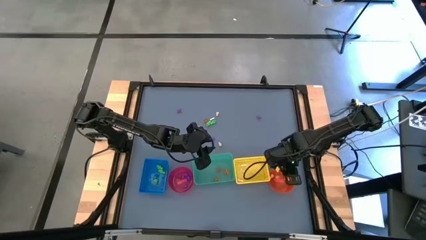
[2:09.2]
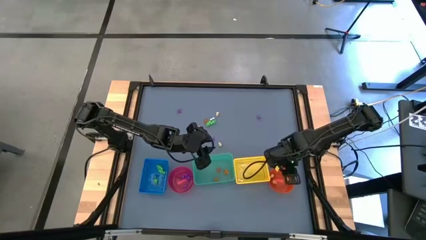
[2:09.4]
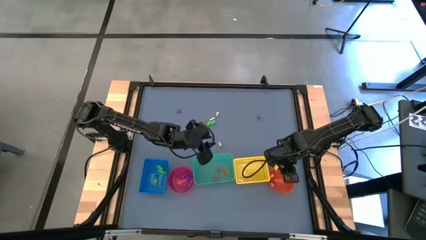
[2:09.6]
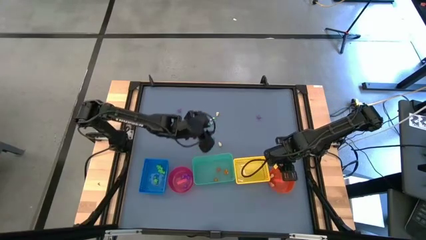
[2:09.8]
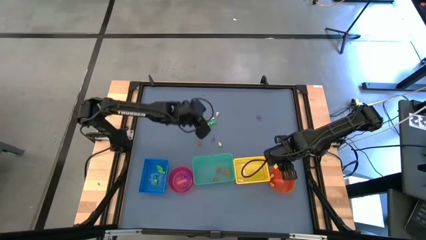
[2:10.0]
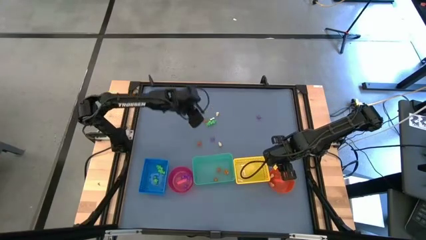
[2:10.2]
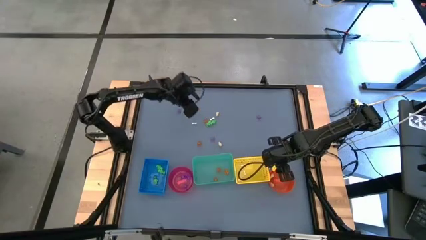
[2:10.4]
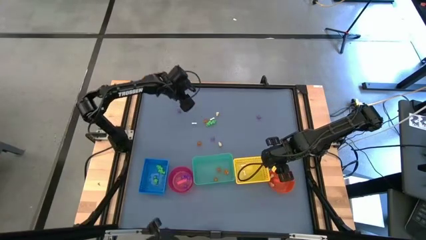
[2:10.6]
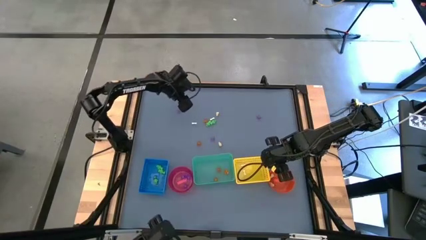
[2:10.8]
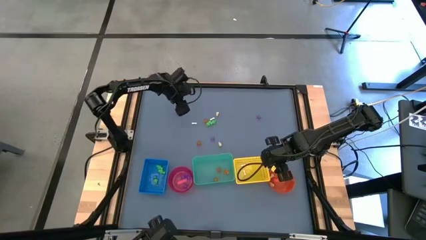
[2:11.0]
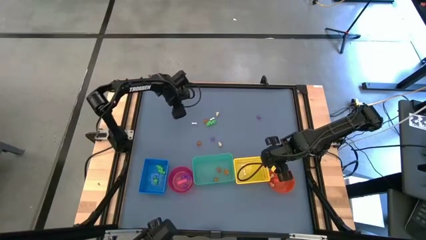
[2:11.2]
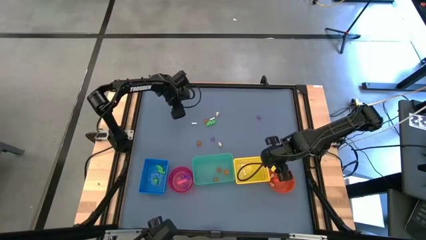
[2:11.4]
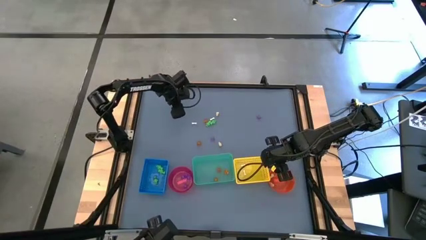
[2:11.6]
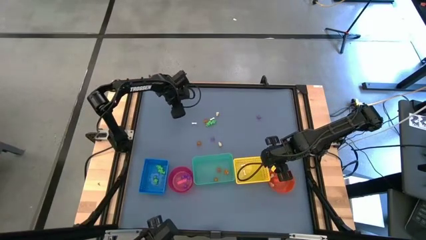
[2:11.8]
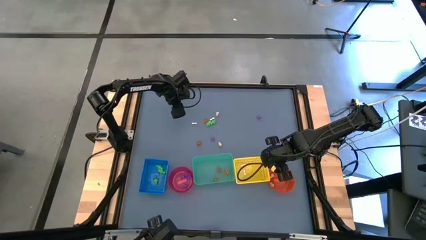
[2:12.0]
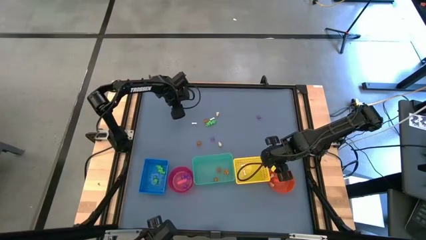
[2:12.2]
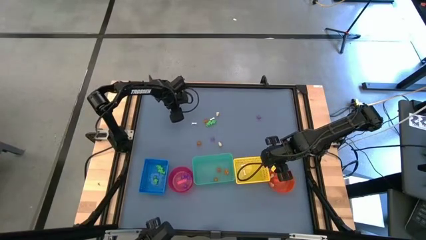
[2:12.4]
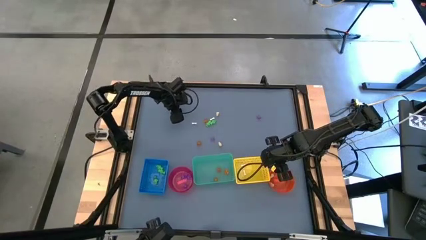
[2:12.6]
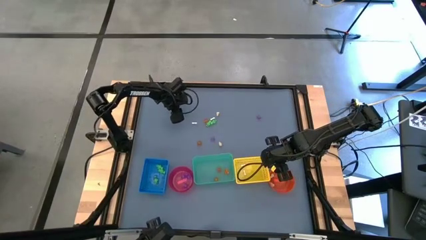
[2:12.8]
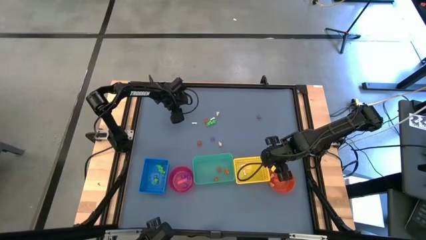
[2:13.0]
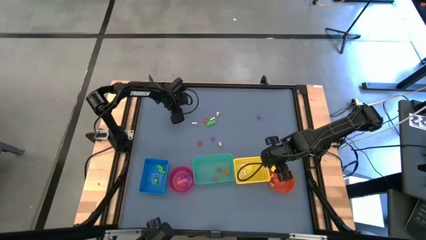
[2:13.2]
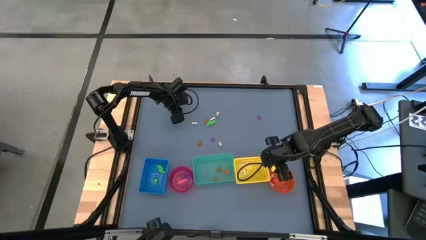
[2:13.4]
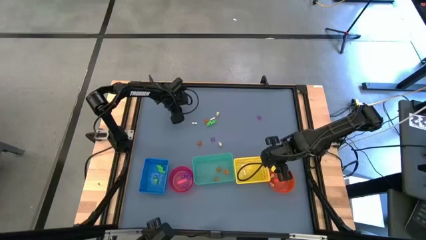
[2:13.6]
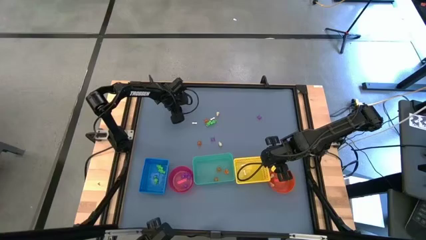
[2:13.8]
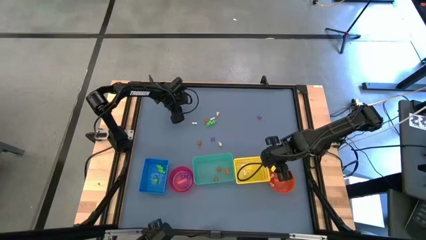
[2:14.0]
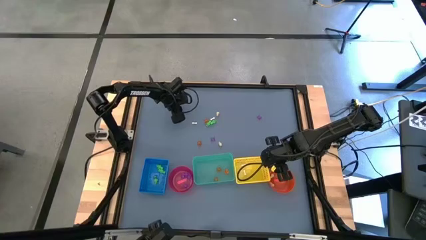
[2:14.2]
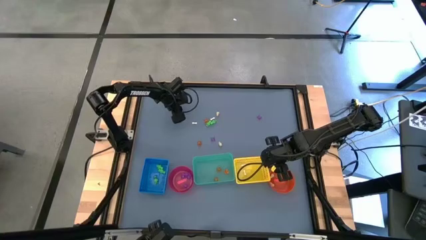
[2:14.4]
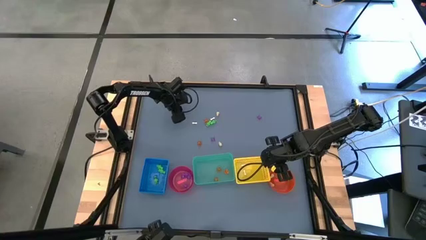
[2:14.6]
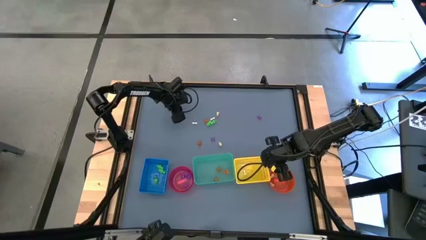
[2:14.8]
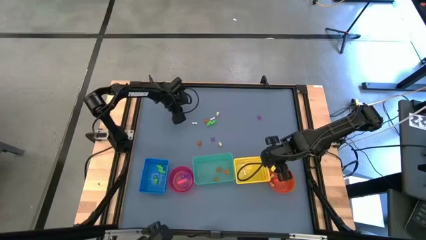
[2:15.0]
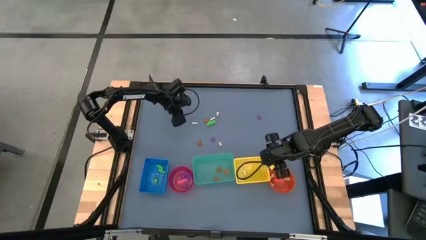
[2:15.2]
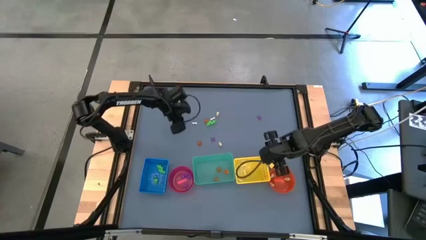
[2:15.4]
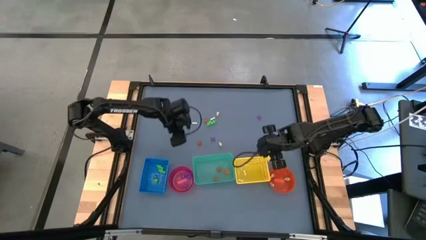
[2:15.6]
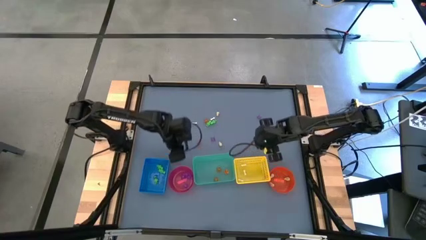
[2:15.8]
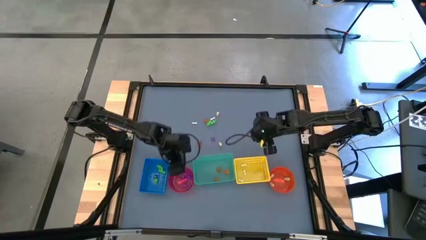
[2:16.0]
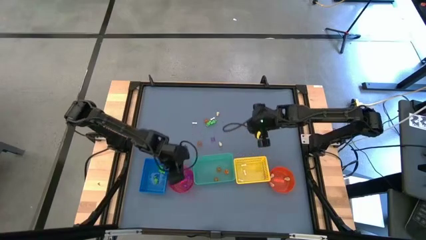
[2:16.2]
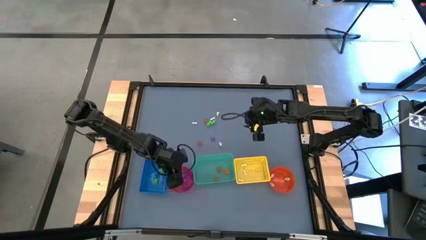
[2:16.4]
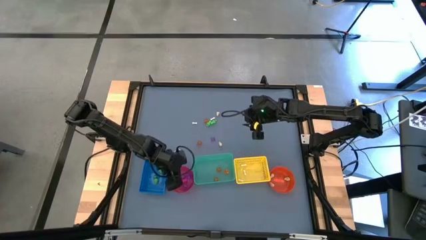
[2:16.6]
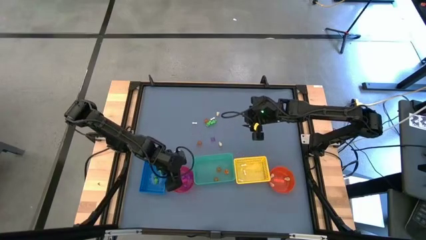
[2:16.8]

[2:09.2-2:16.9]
Task: Sort Halloween decoration
Put the purple spider toy into the pink bin

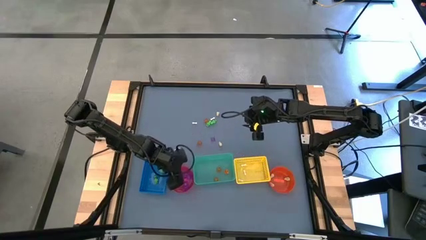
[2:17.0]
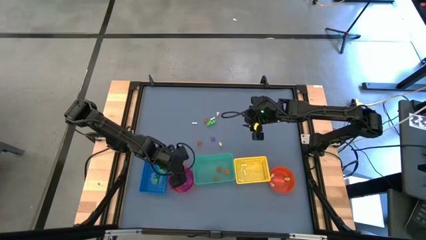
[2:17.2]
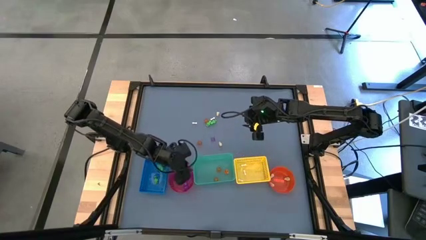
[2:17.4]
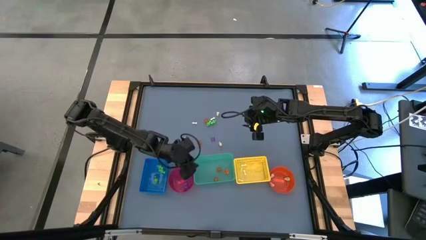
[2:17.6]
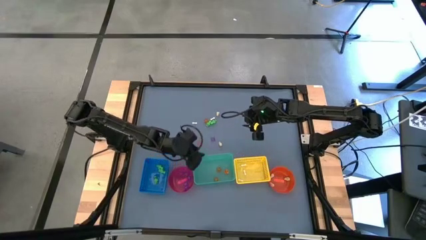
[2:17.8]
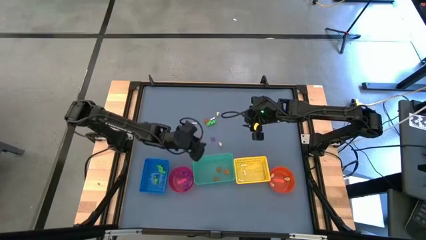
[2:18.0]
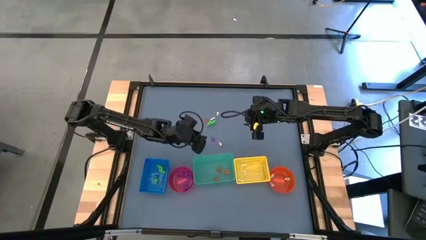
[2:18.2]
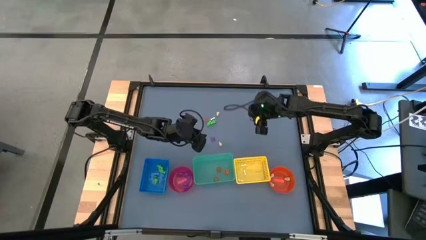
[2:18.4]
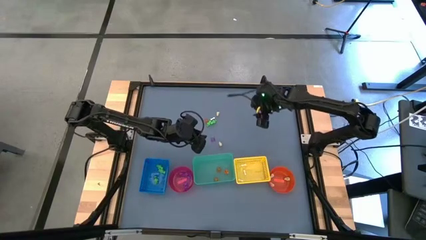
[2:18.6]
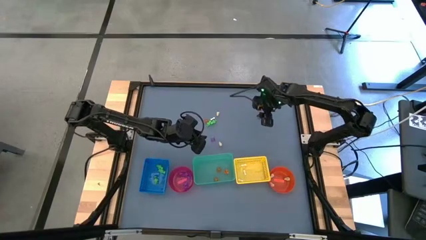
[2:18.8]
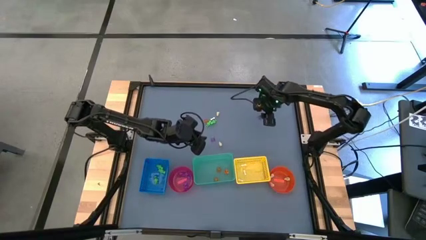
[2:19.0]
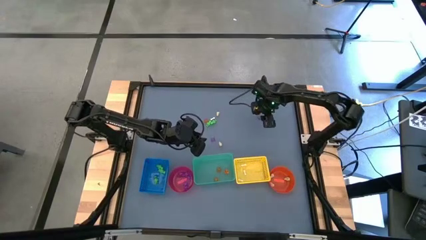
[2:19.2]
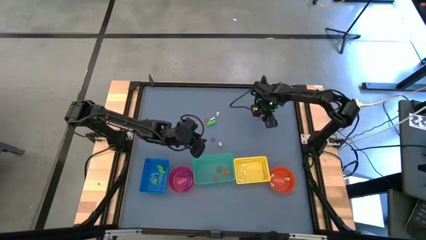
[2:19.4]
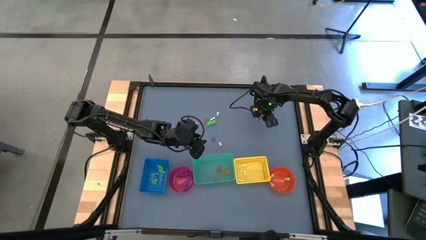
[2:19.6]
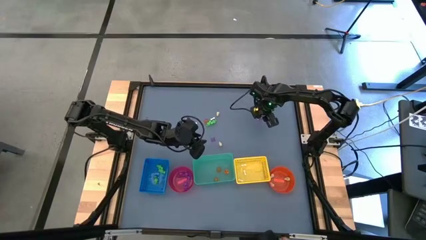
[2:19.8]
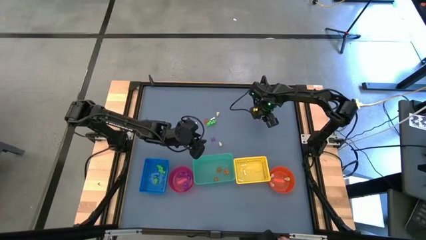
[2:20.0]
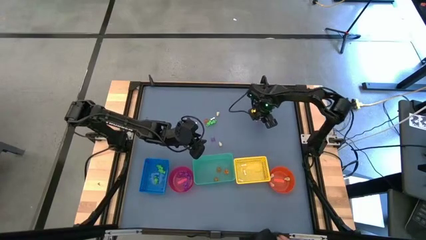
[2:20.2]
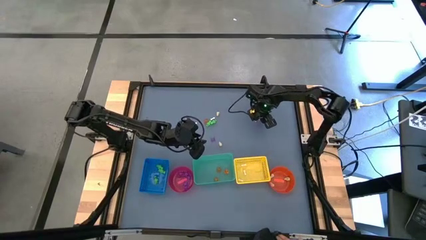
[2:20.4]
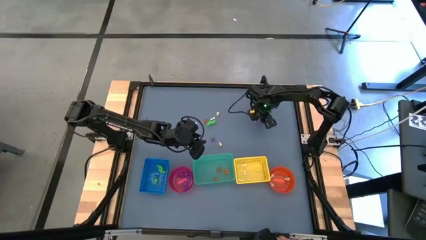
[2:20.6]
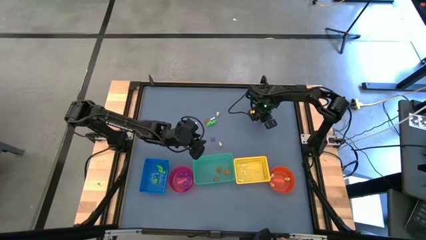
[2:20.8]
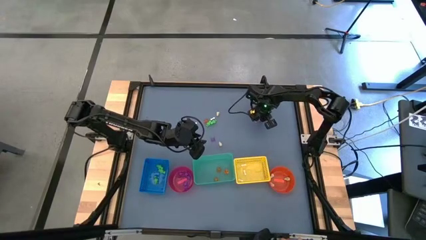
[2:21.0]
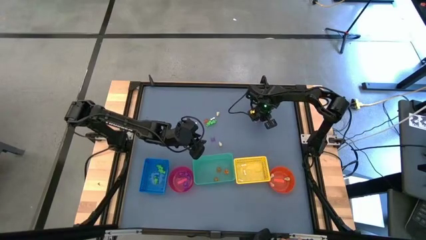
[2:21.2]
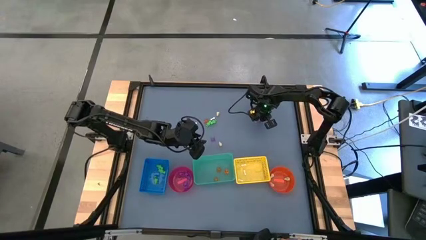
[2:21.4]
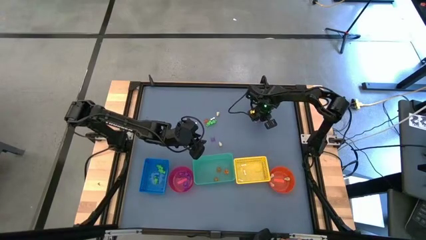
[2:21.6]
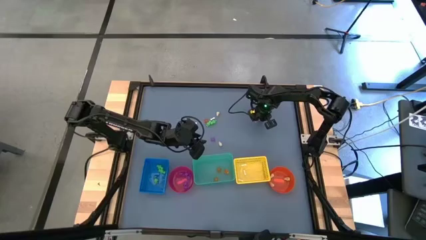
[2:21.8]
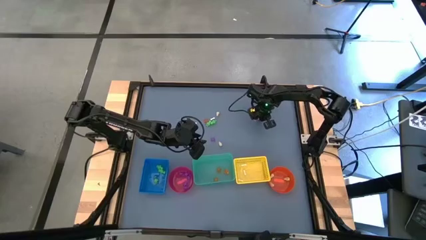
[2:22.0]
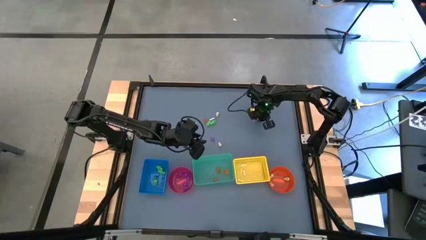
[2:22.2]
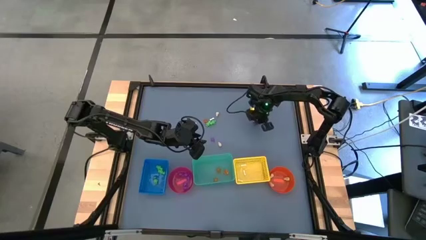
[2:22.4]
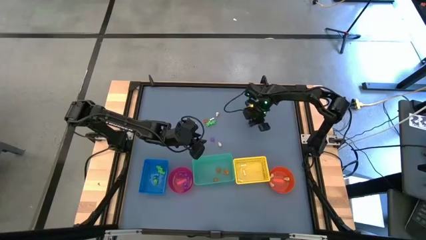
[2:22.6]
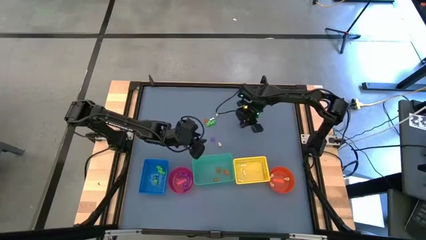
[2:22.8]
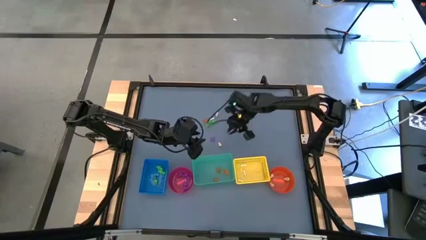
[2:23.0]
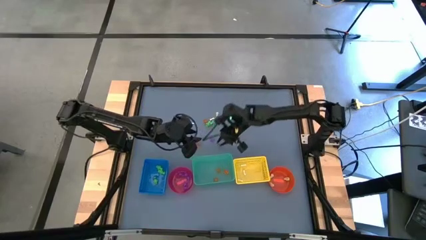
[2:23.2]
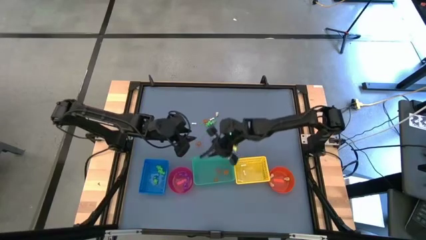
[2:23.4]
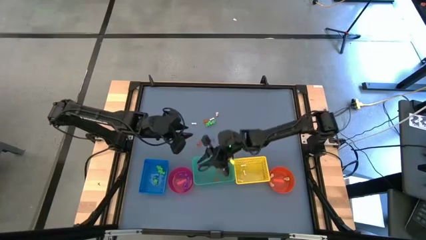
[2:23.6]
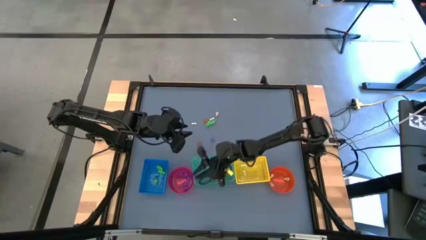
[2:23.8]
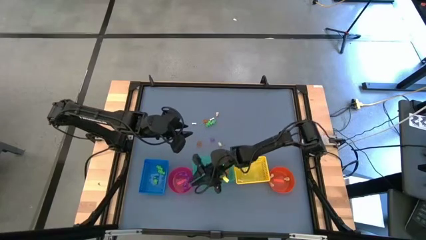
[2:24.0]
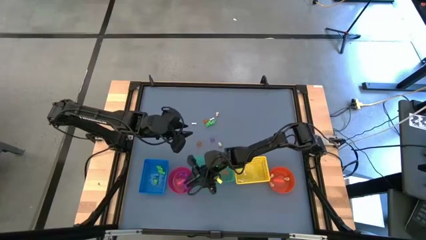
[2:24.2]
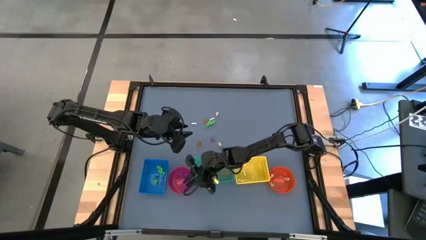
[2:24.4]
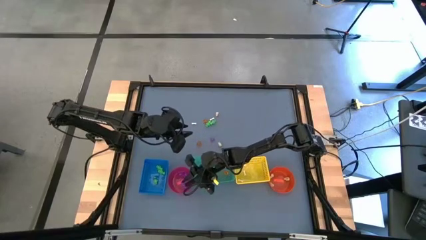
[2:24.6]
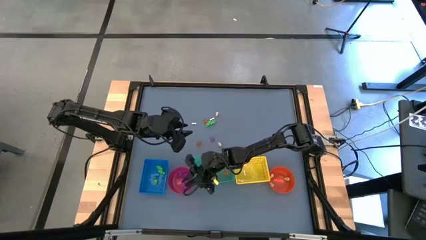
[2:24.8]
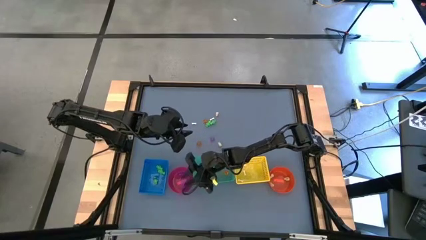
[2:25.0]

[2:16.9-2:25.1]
Put the purple spider toy into the pink bin
